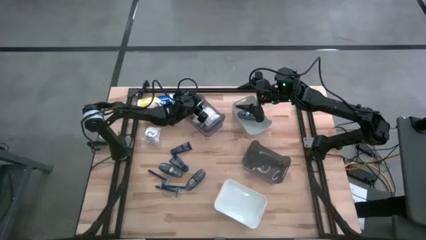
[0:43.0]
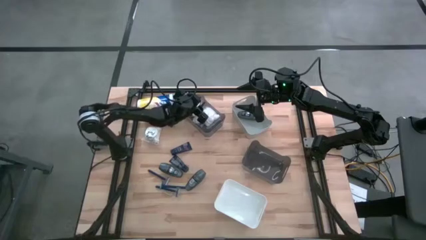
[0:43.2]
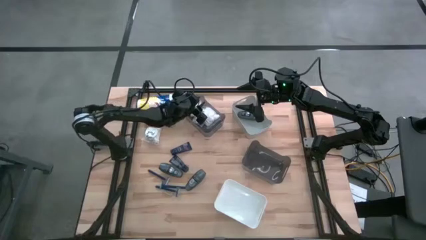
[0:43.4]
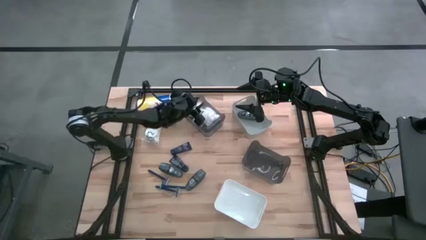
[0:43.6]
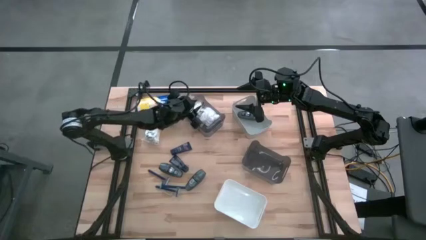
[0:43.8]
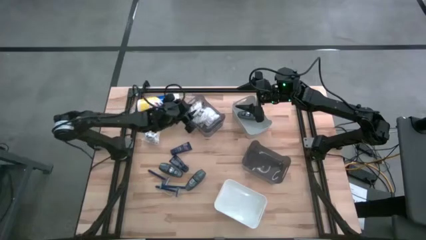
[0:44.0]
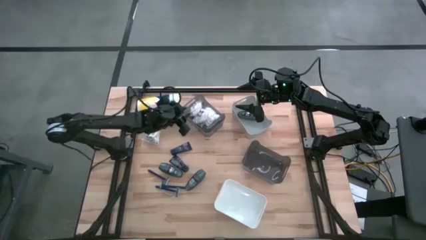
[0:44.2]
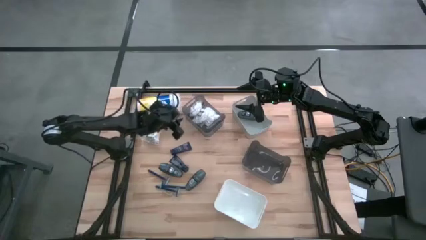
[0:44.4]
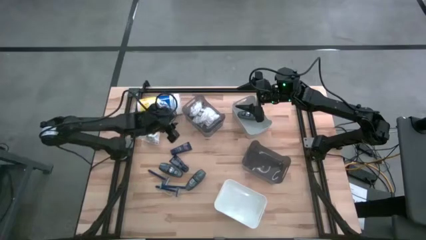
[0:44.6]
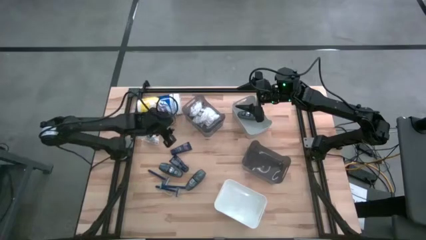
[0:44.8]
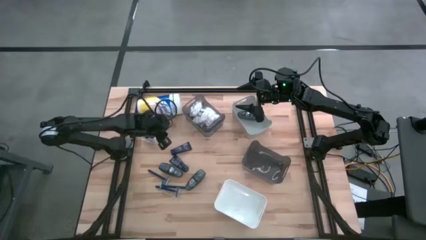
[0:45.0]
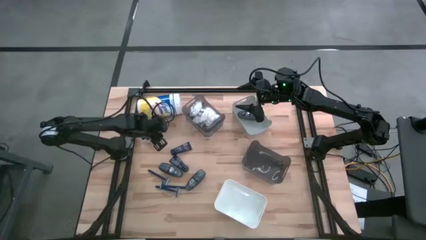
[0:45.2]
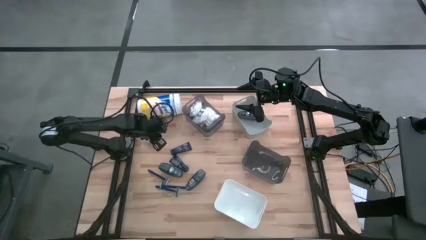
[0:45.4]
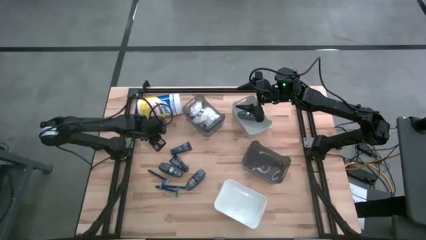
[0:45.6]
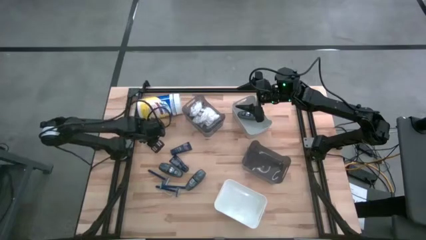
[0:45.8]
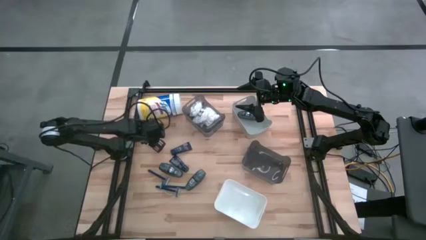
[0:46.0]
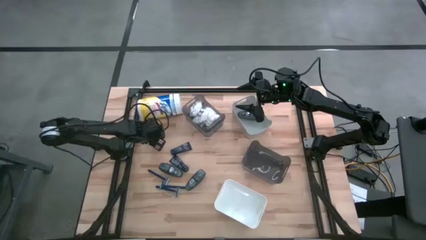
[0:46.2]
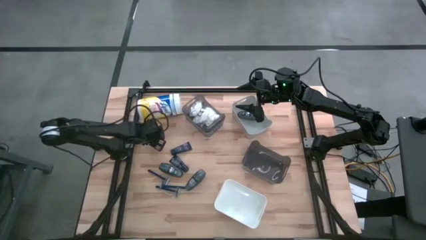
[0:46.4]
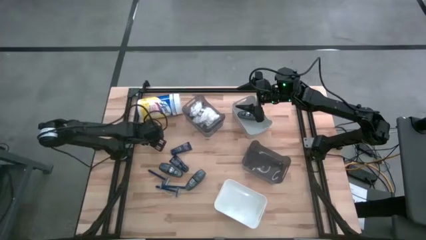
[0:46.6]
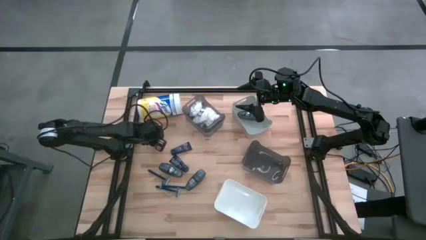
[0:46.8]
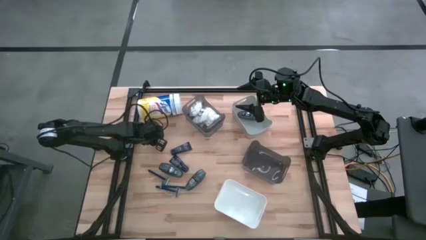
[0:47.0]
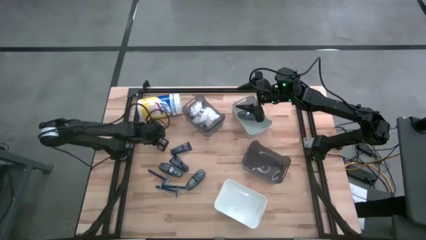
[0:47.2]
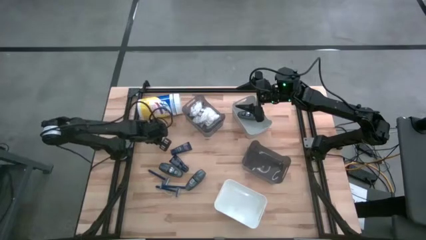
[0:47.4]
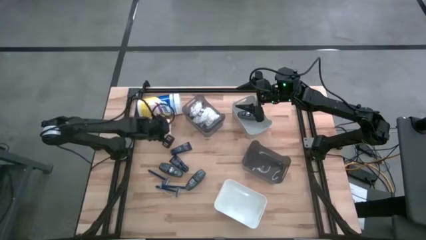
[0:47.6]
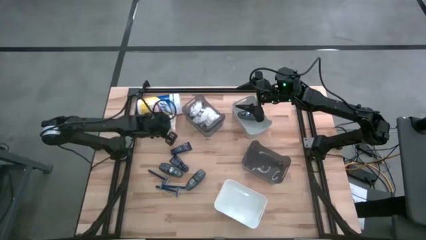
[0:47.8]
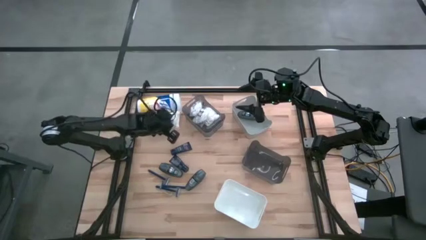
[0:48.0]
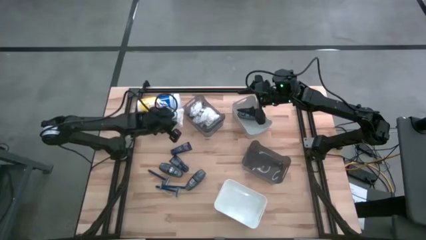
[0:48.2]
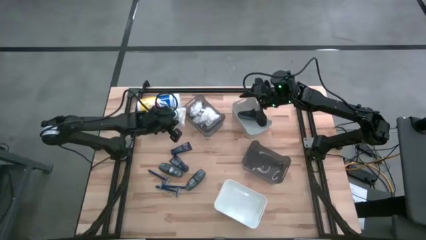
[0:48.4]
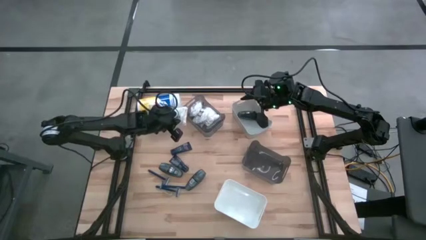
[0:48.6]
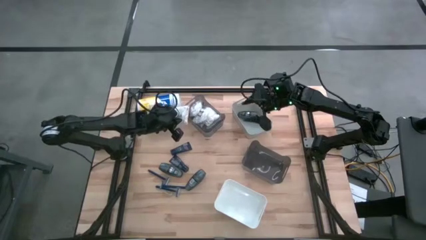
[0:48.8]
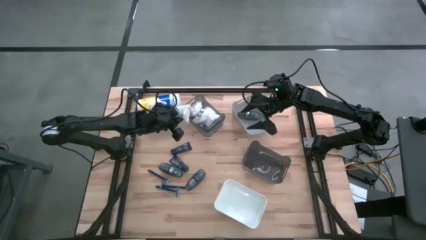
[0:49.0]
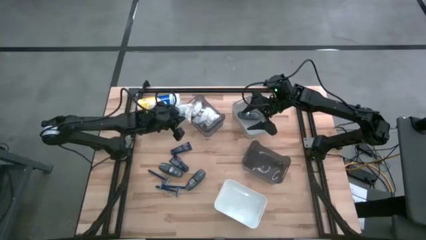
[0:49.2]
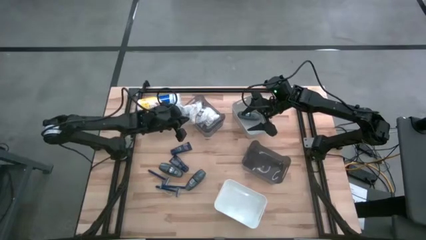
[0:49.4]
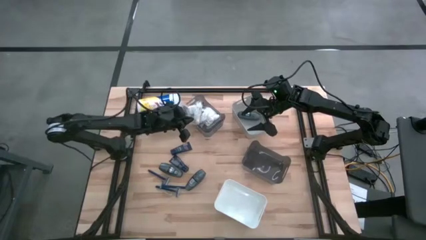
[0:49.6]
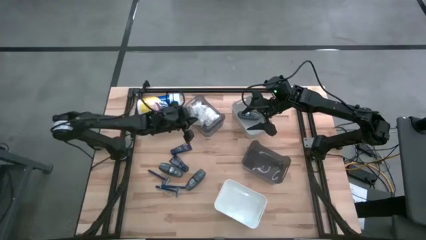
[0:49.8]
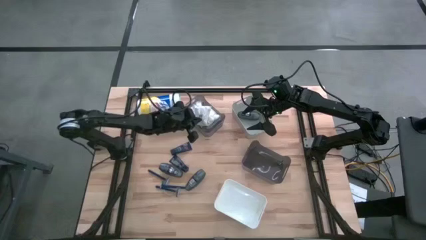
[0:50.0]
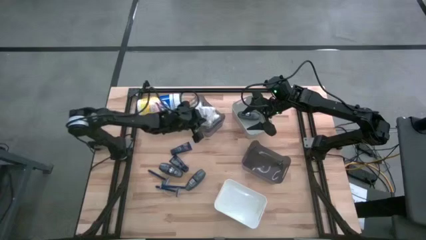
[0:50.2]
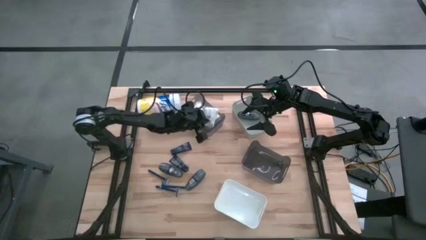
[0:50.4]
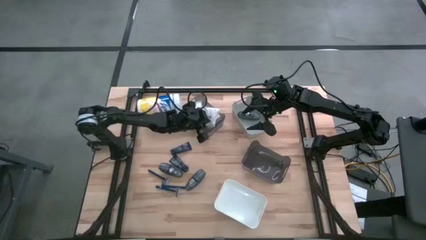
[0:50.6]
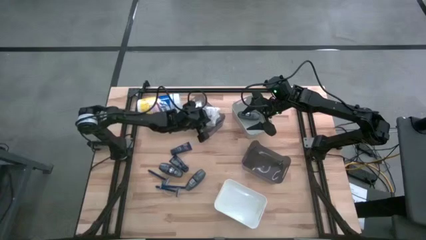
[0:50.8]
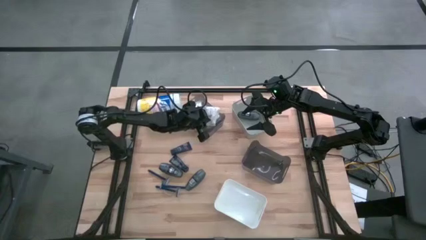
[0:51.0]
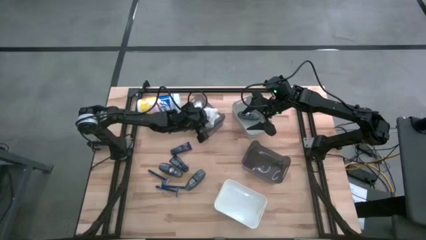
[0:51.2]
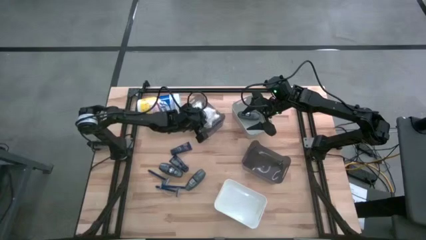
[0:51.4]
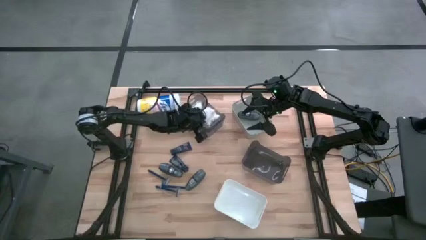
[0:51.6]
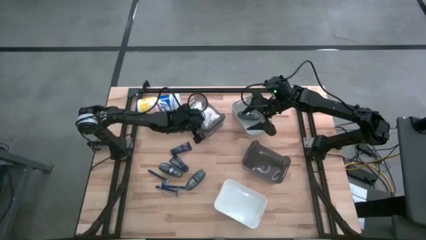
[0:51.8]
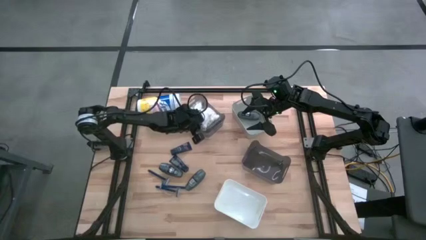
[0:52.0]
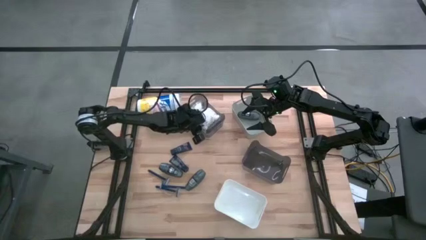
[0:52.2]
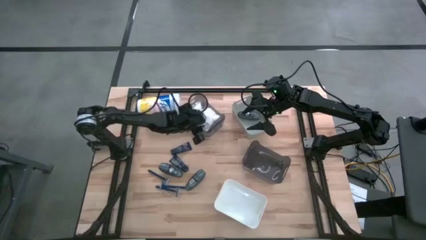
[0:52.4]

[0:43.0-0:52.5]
Task: Pick & Place Travel size toiletries
Put the white cotton pack into the top black bin

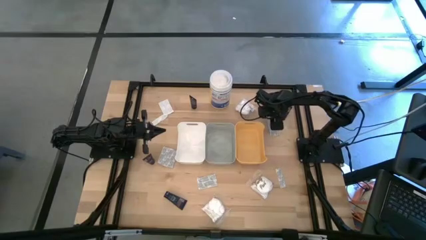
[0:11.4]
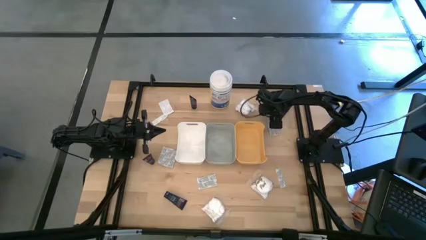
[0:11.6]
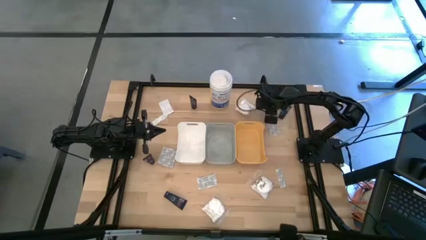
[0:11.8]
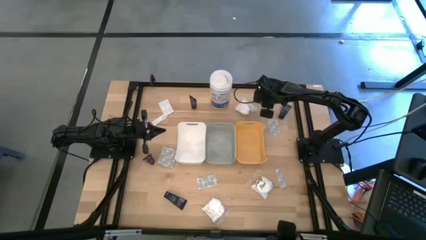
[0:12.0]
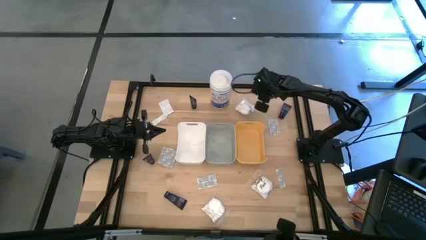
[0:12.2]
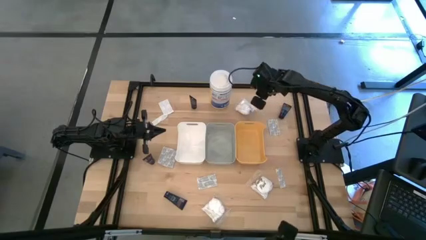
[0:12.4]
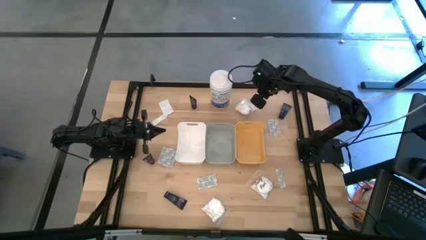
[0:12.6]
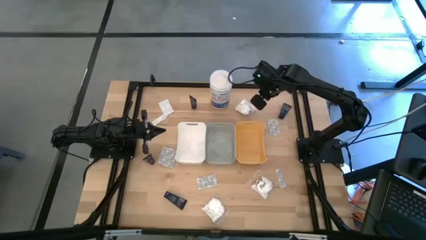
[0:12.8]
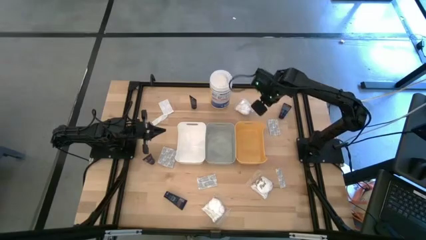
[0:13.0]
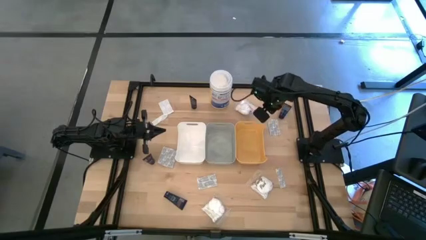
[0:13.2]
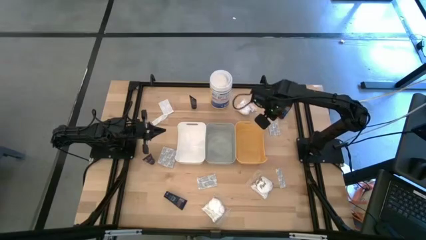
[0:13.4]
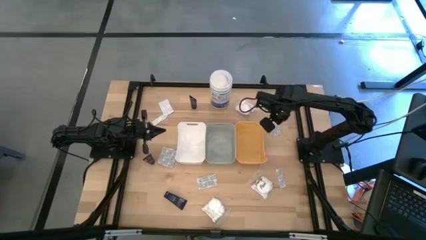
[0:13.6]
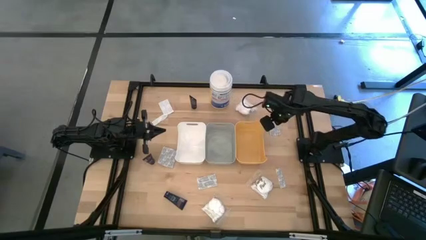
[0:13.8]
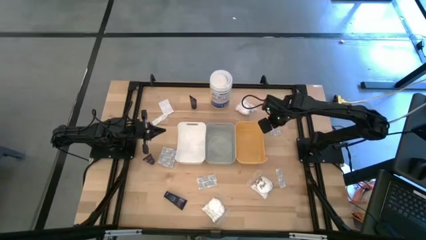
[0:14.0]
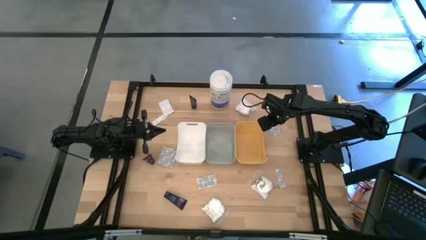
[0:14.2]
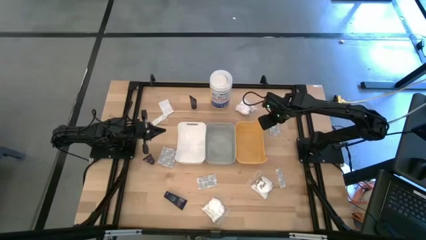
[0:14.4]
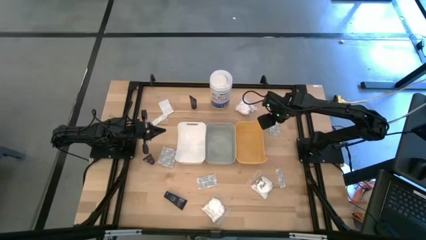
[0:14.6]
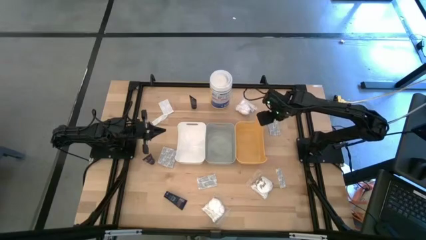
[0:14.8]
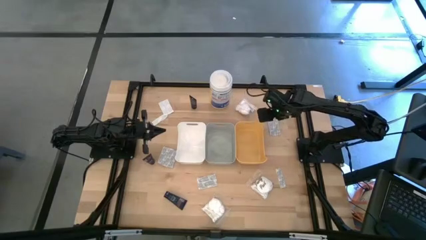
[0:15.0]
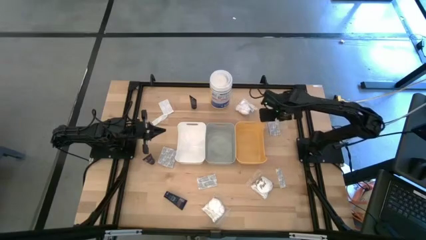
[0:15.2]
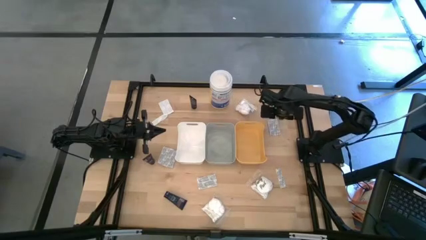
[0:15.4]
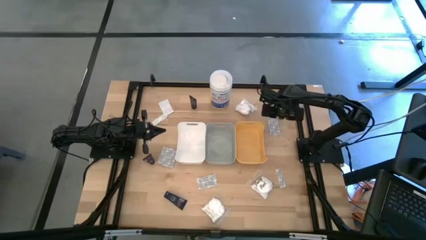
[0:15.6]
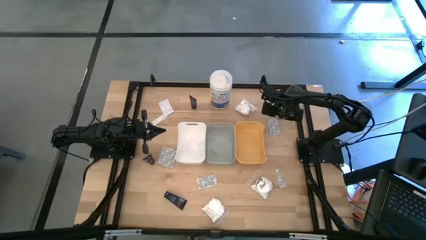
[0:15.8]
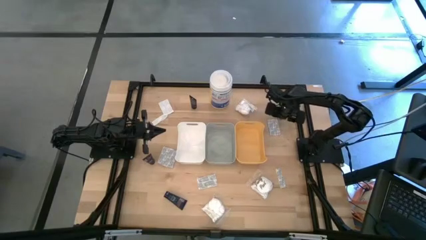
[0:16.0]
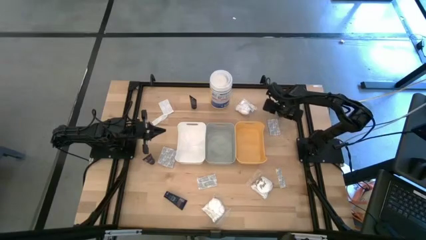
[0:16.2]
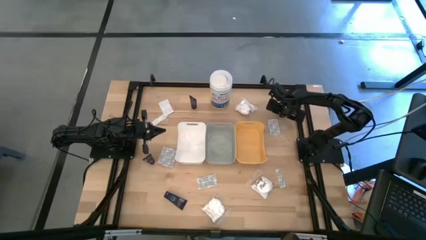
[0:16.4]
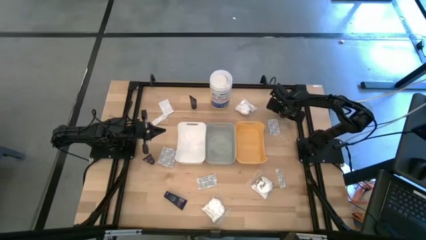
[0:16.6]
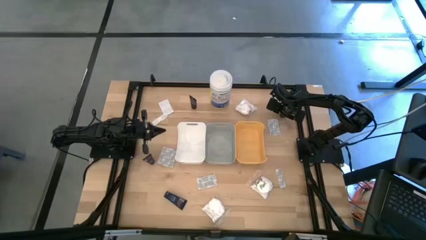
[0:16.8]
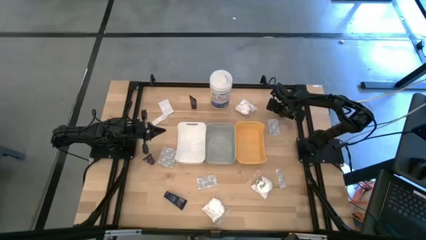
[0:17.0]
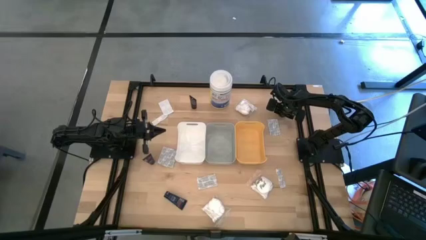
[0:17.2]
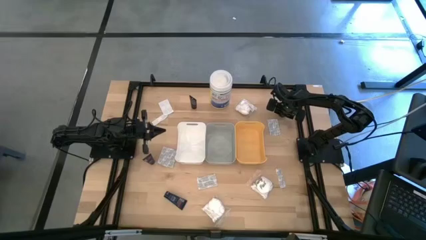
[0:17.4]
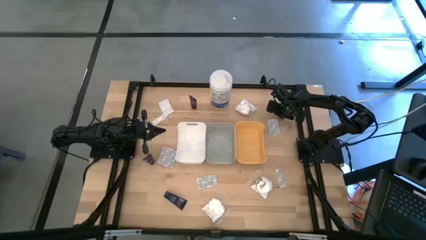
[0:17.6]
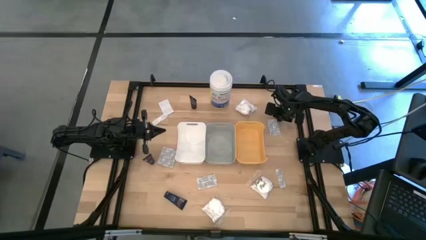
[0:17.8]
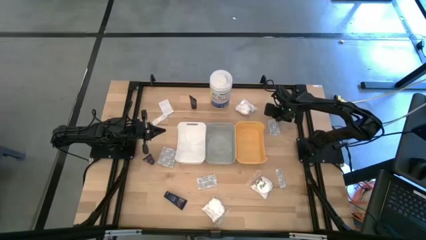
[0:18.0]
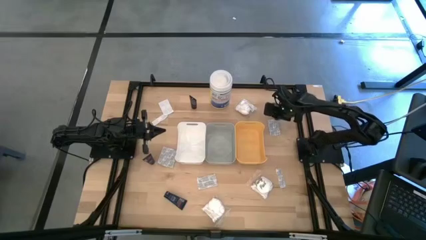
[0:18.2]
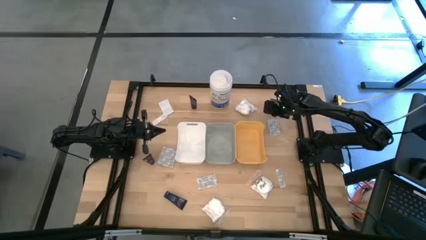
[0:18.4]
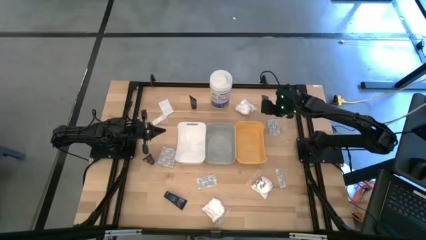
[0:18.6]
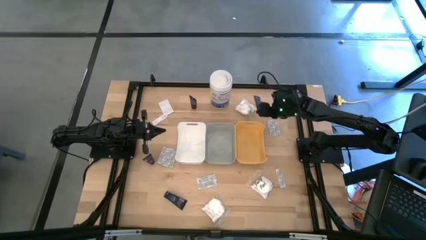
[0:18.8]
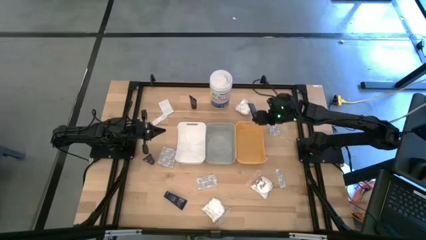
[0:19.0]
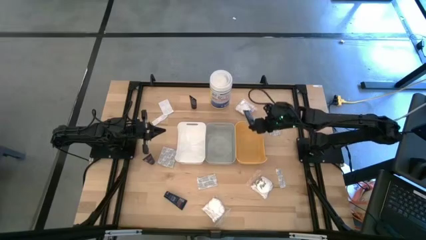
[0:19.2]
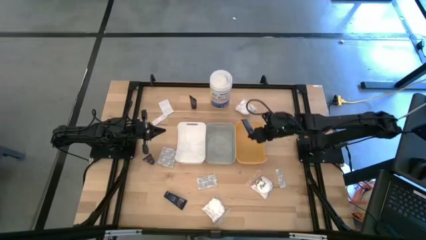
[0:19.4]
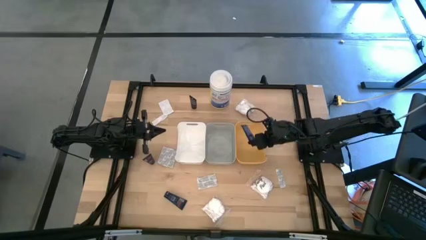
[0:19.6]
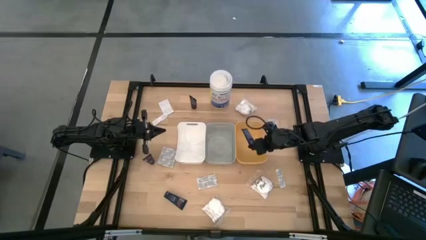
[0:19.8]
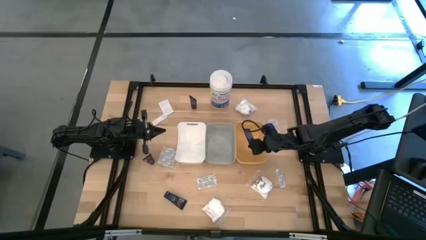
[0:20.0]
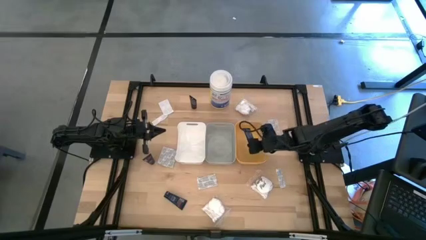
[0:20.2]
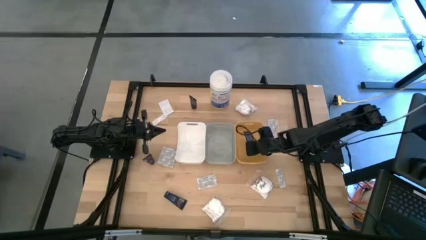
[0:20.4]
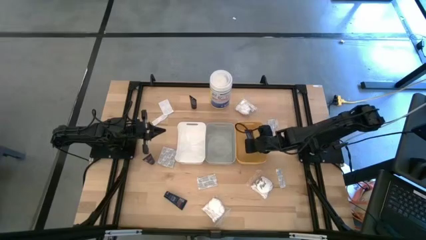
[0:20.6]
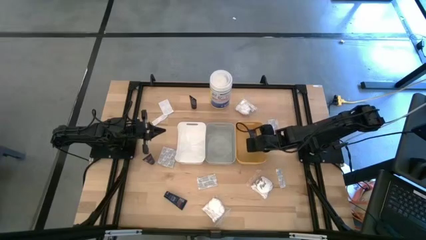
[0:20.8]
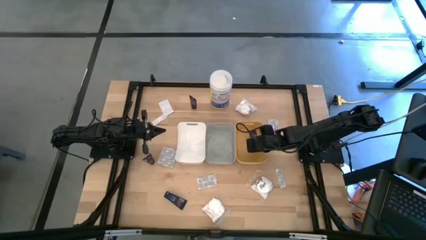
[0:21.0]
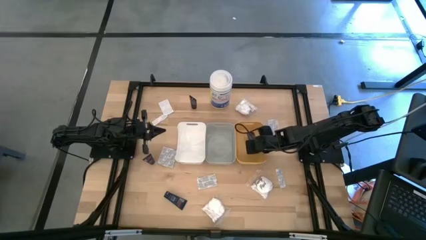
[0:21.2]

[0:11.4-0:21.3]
Task: Pick & Place Travel size toiletries
Put the black shave cream into the yellow bin
